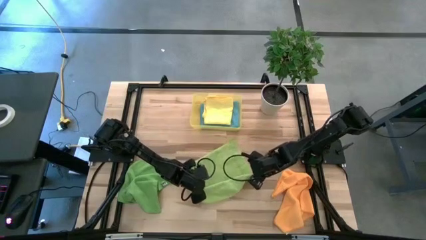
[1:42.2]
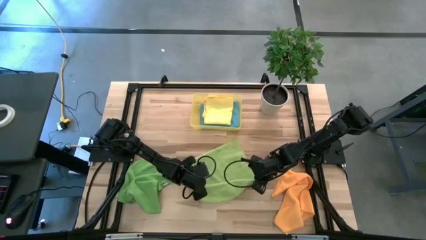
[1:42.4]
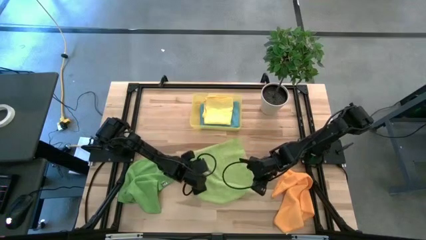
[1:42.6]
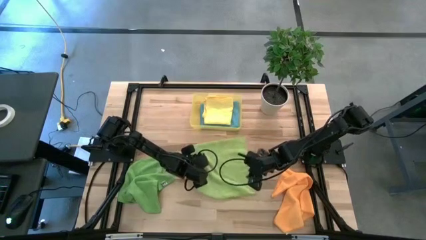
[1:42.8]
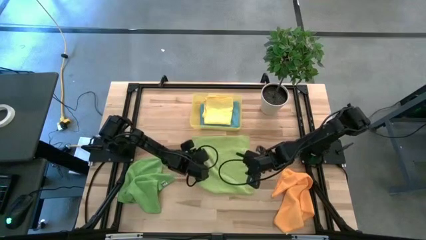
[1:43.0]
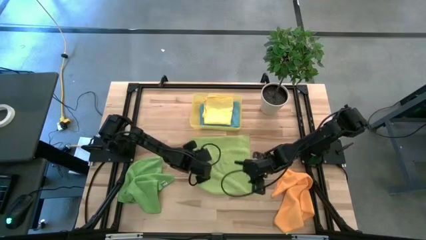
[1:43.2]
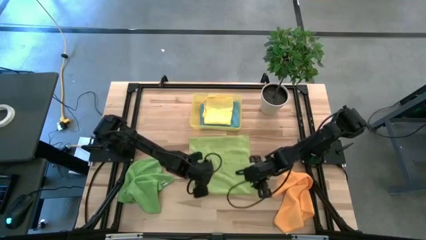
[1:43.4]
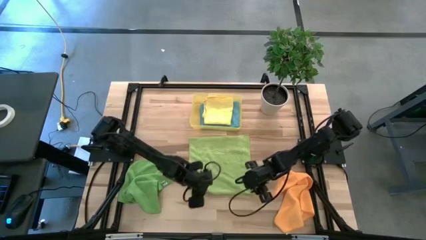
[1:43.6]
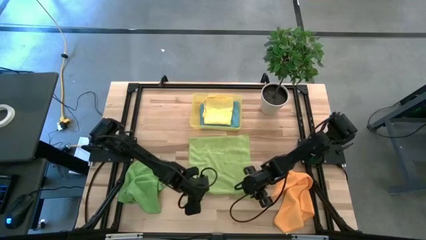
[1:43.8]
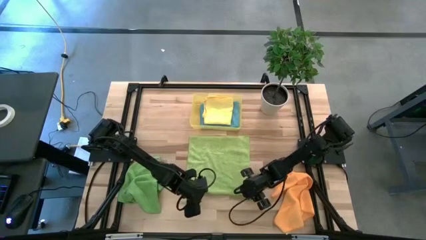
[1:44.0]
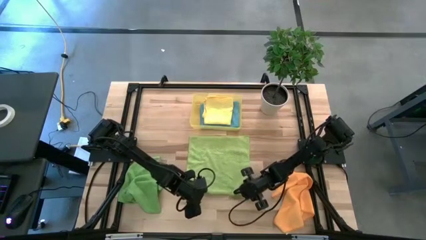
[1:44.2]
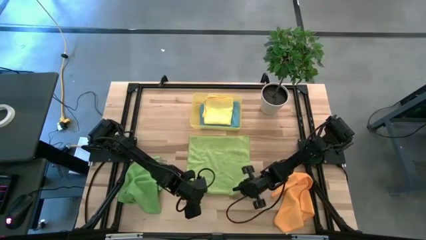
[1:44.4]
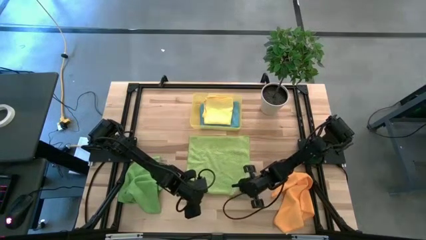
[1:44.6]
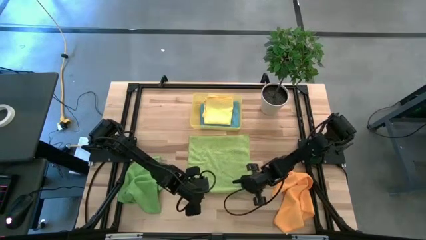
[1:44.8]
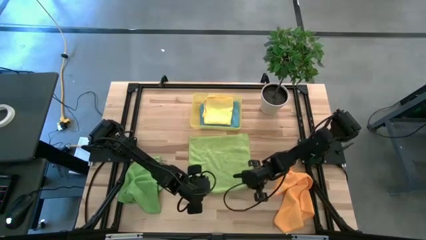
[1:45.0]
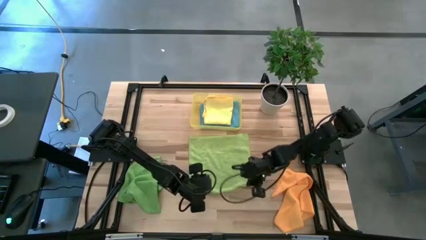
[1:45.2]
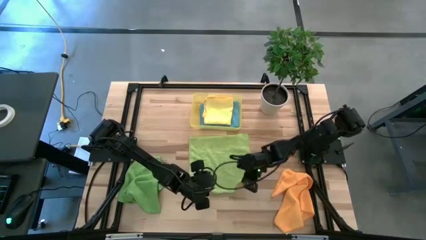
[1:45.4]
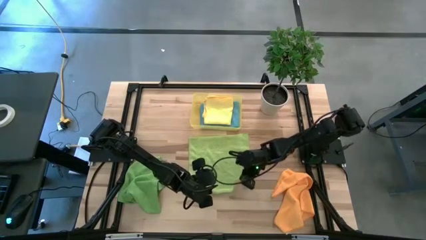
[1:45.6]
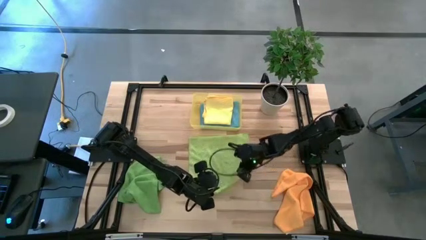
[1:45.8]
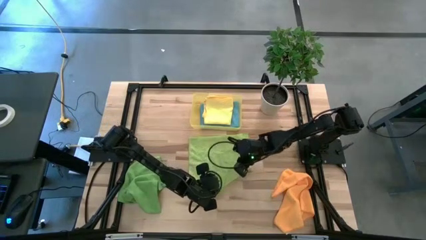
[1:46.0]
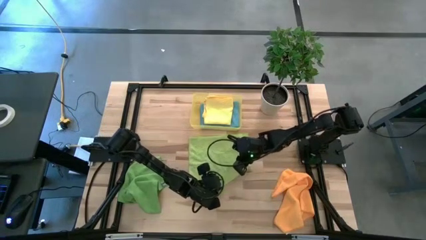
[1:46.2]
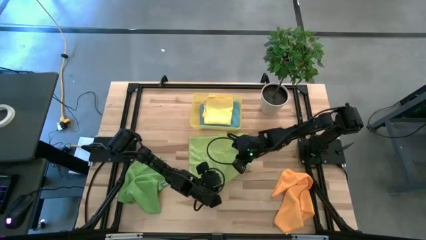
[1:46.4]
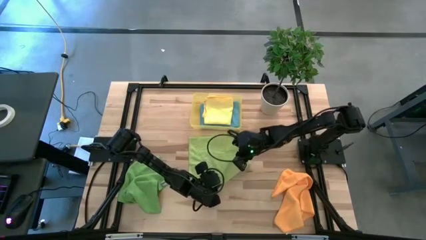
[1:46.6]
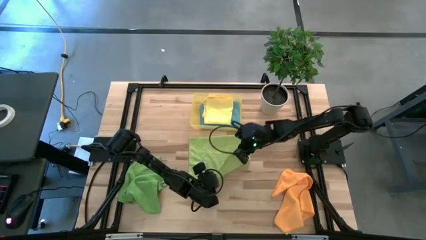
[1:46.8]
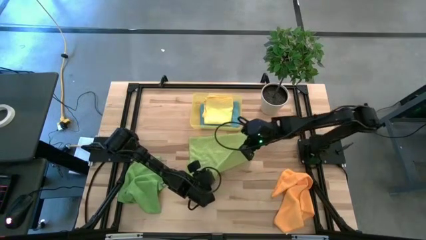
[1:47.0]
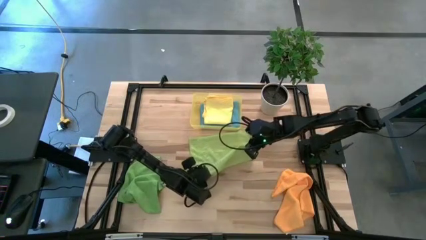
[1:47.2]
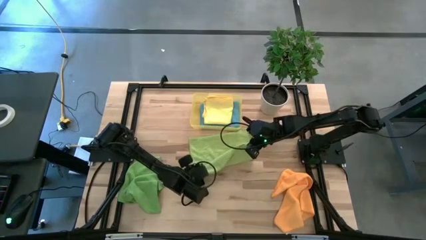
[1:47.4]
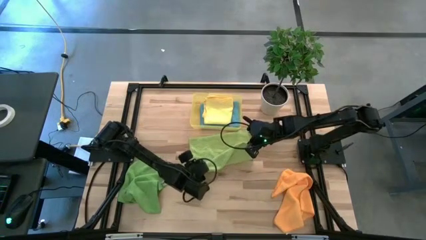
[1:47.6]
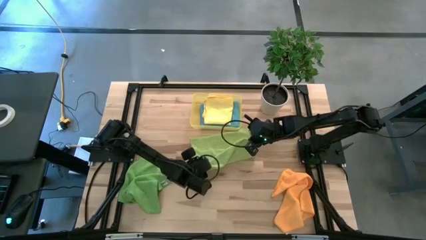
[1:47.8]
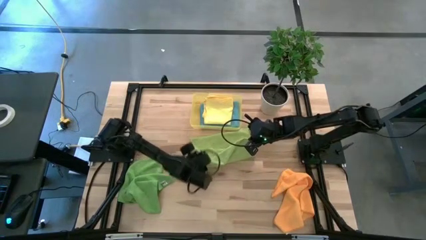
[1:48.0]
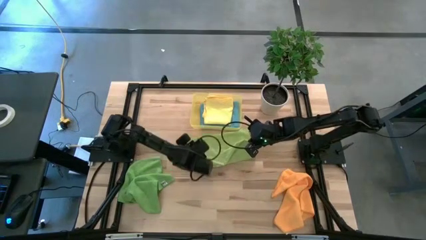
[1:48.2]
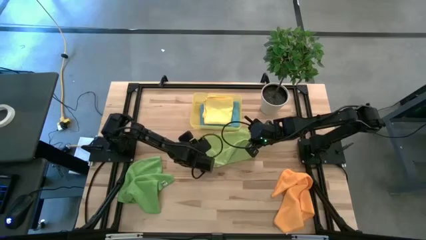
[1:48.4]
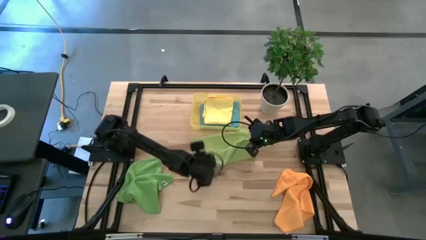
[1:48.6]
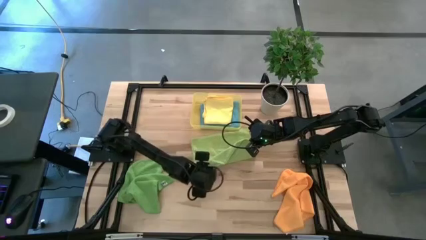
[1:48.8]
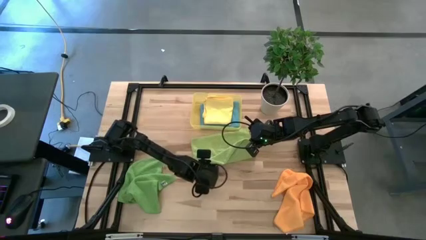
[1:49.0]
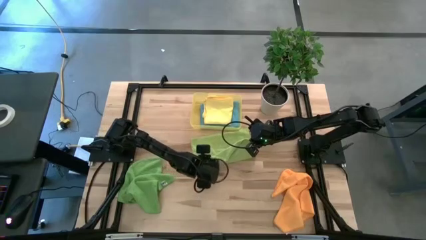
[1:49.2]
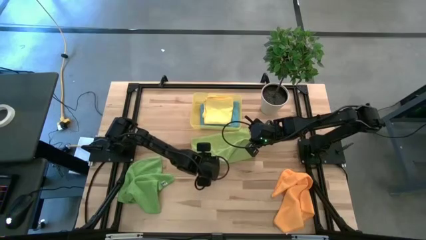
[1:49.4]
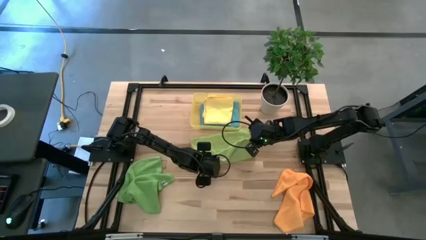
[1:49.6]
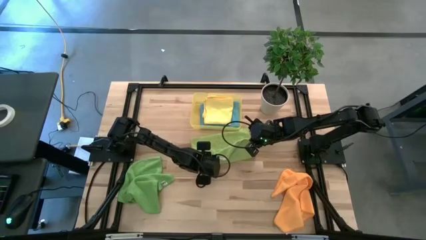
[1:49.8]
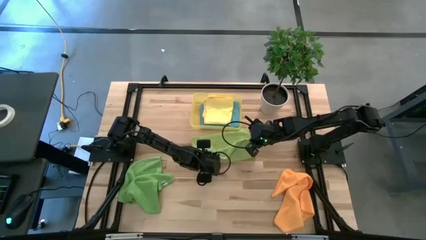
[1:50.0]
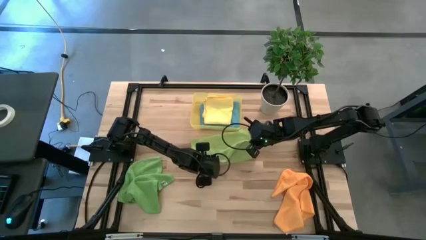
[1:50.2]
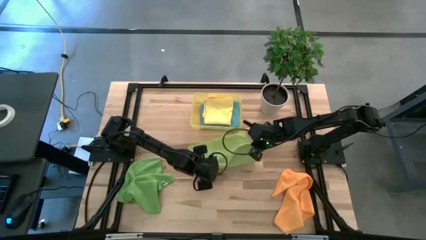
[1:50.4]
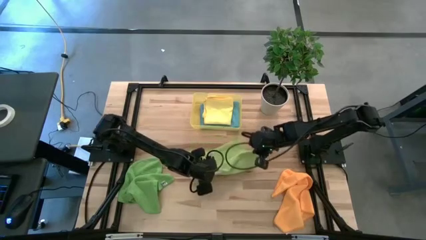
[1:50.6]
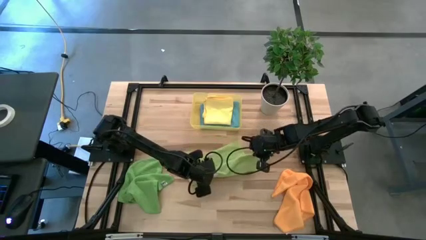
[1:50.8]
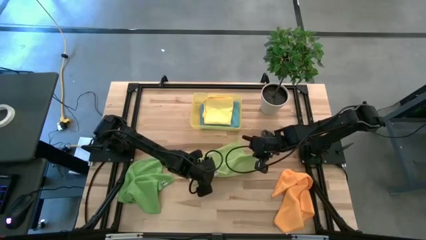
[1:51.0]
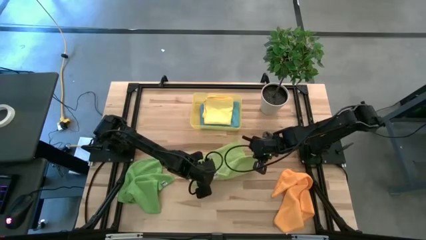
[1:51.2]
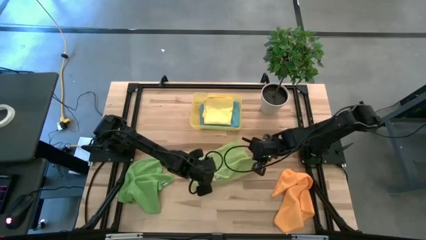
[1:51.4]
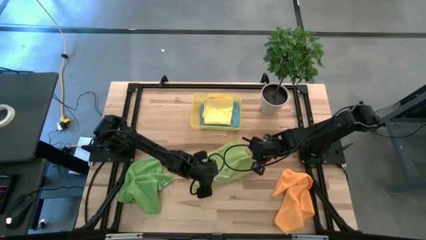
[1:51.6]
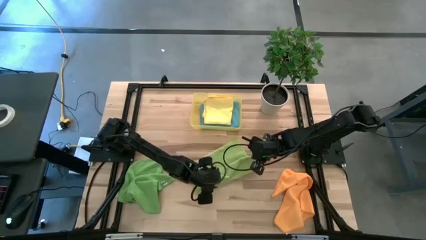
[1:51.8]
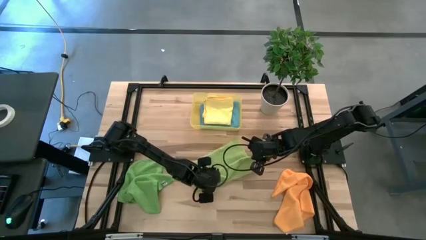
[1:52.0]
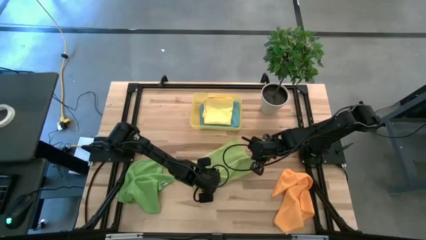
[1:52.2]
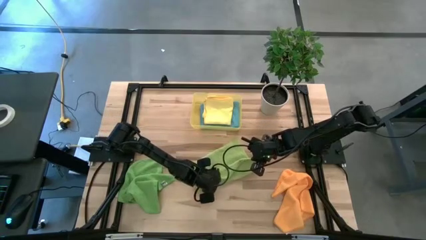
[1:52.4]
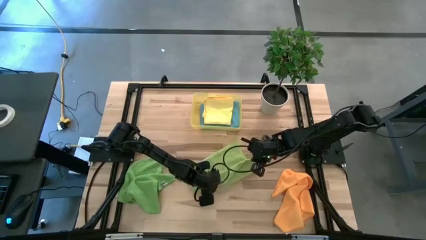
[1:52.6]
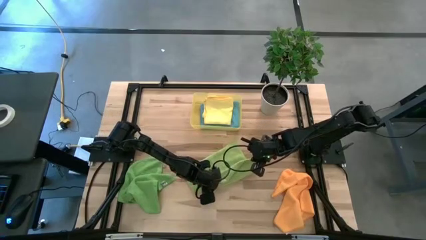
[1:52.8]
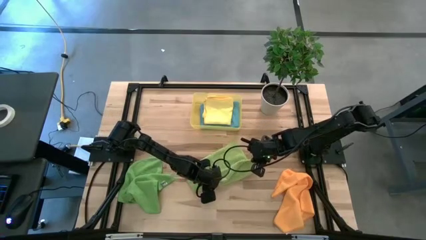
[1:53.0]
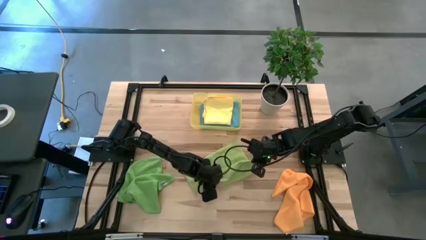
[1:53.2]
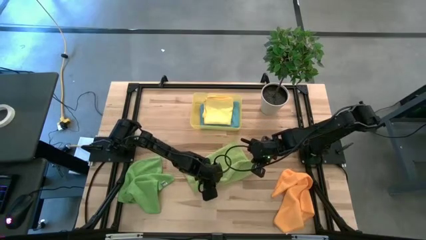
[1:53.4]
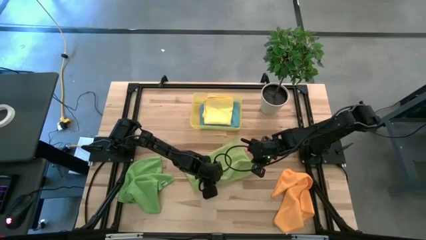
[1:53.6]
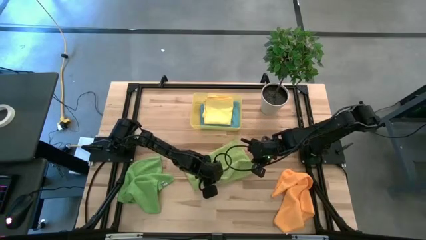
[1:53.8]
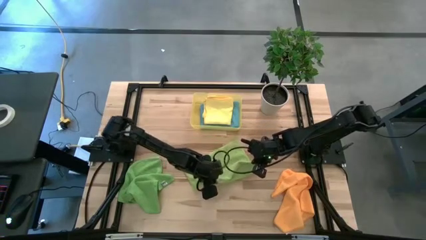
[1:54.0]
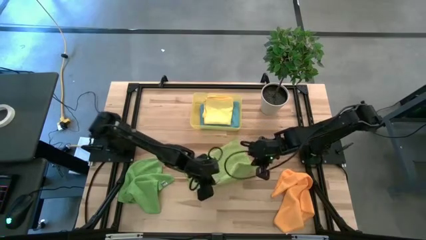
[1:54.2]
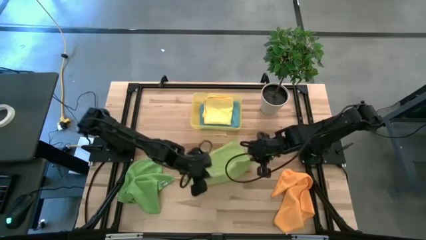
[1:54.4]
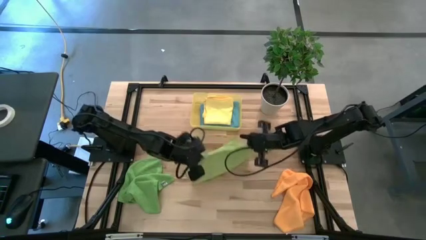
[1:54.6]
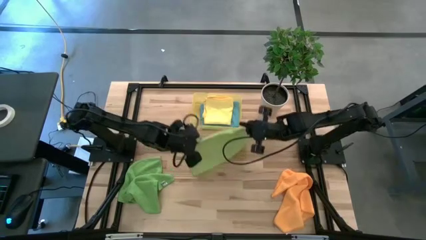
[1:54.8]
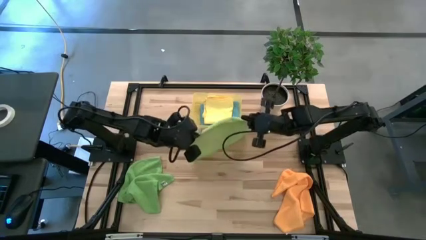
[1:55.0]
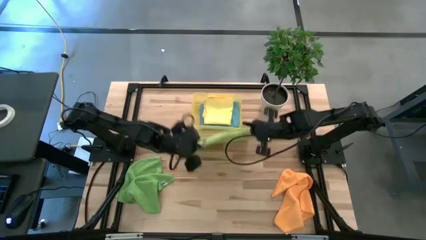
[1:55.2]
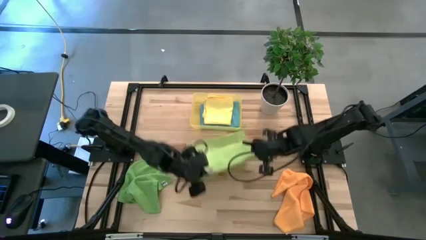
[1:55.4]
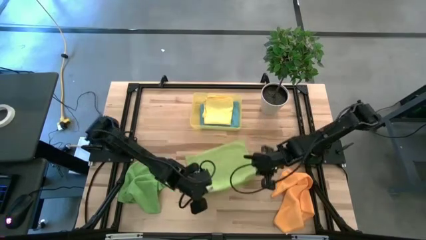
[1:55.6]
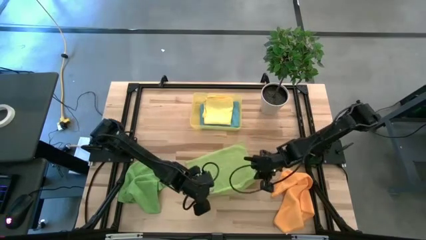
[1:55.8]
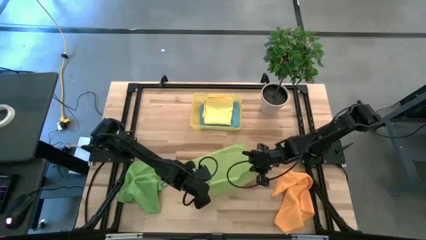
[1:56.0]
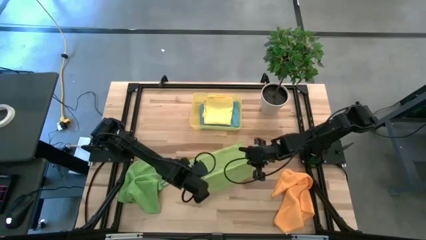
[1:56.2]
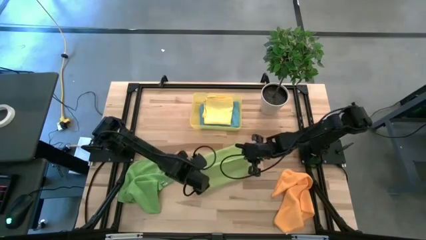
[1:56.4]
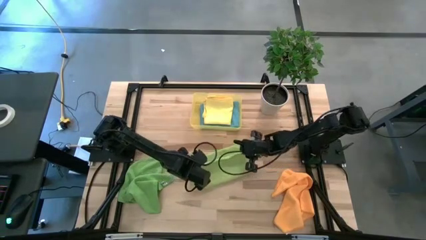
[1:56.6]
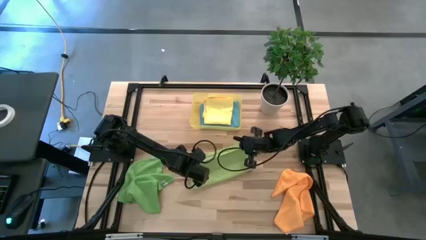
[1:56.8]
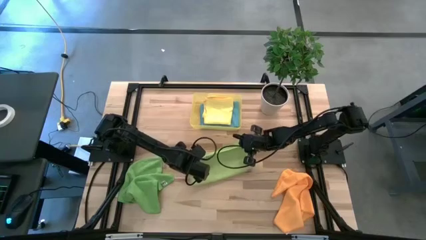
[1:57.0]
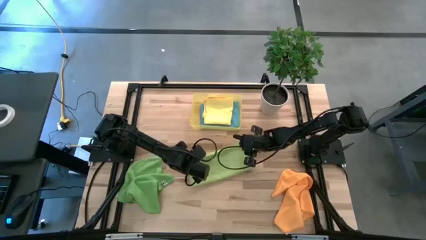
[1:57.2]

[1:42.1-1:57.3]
Task: Fold microfiber towels
Fold the light green microfiber cloth
